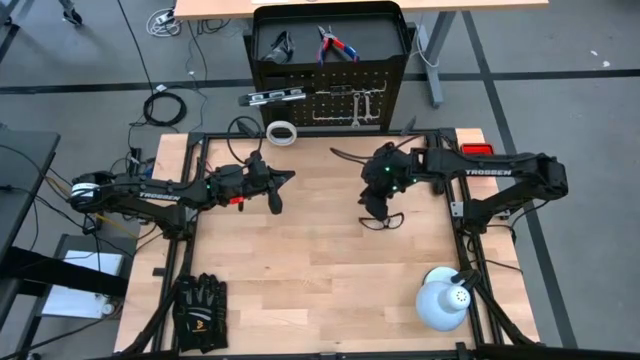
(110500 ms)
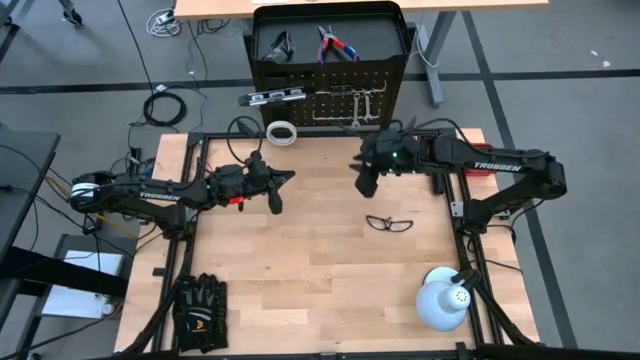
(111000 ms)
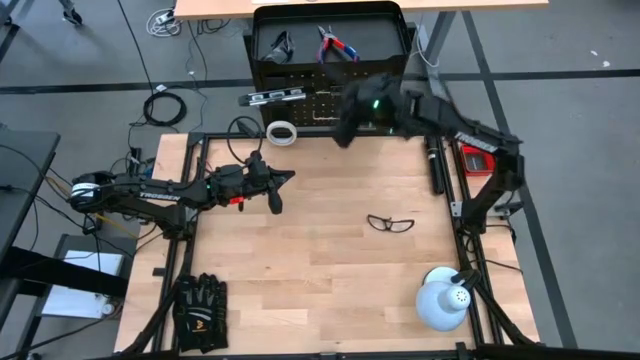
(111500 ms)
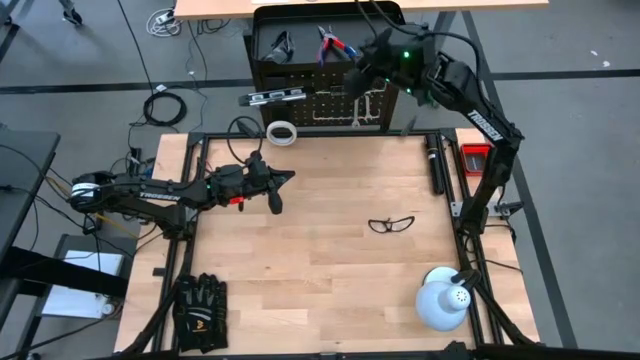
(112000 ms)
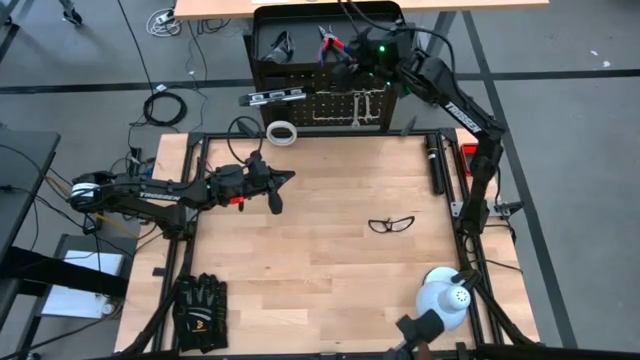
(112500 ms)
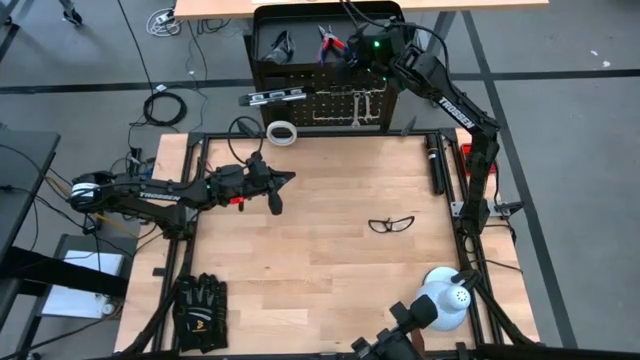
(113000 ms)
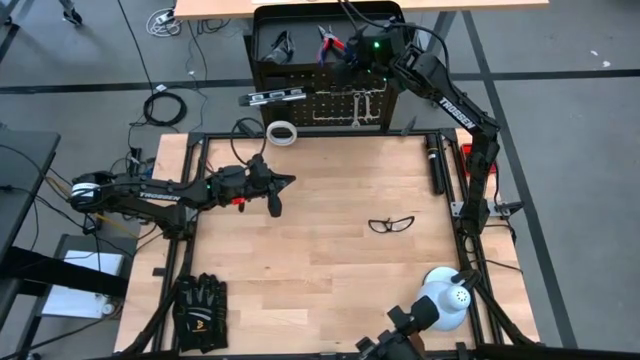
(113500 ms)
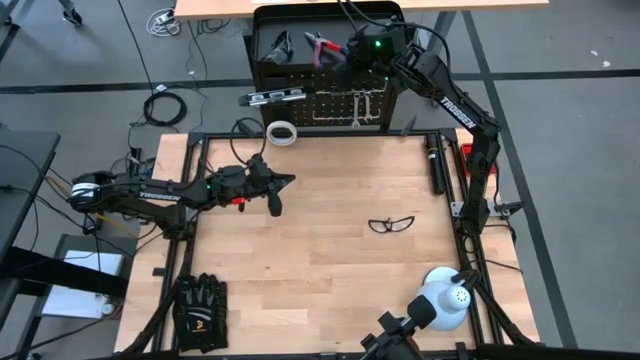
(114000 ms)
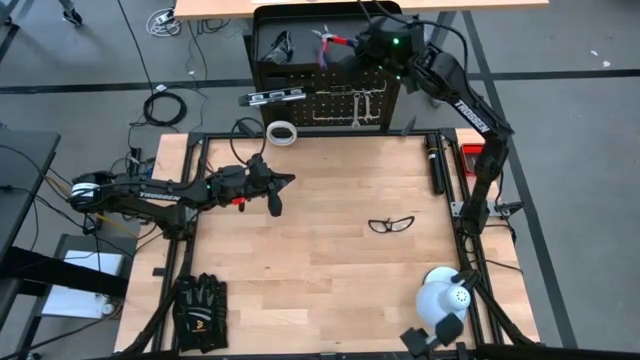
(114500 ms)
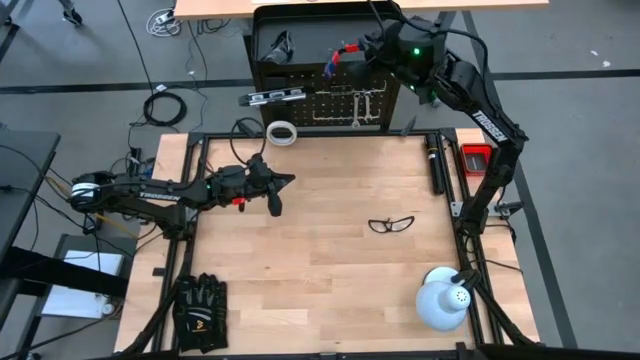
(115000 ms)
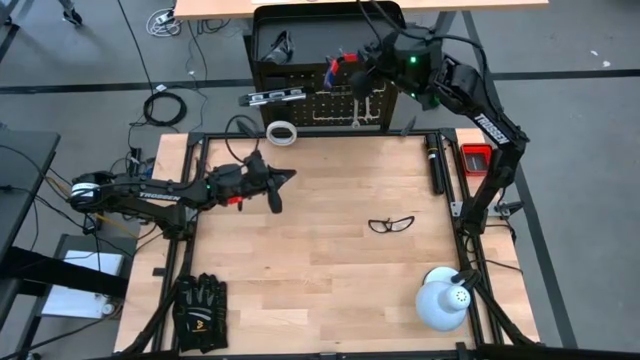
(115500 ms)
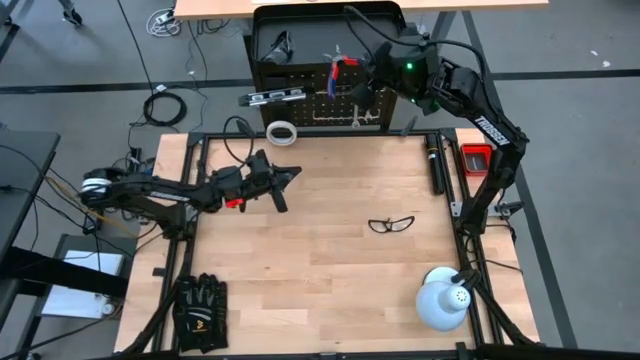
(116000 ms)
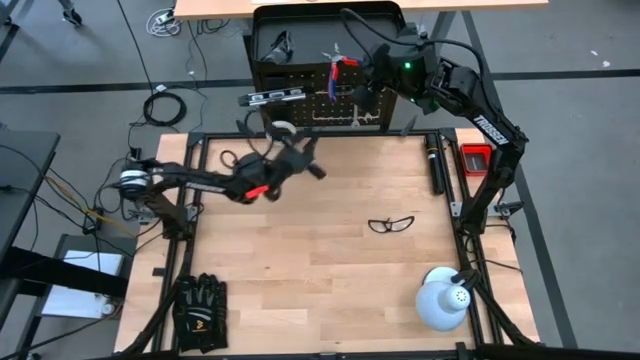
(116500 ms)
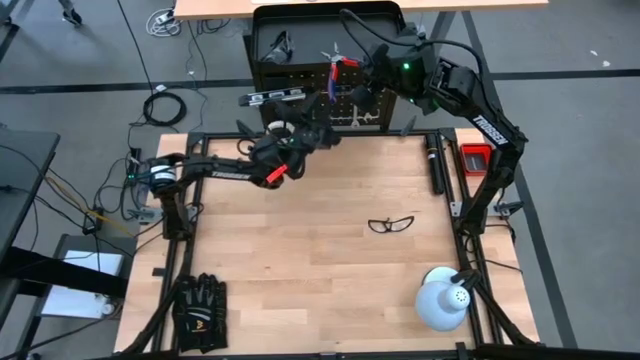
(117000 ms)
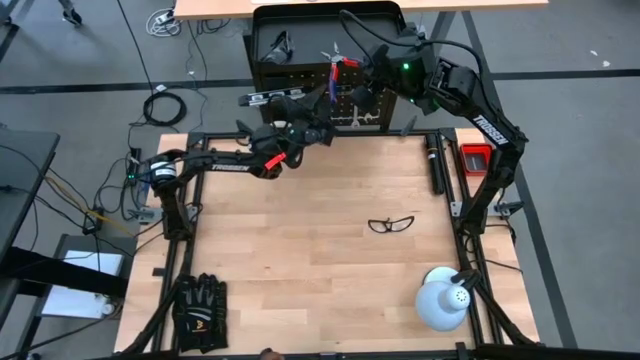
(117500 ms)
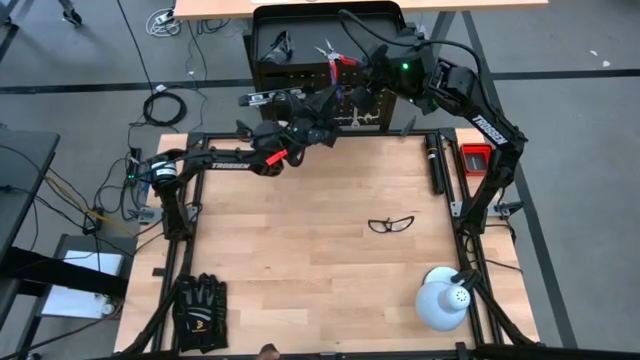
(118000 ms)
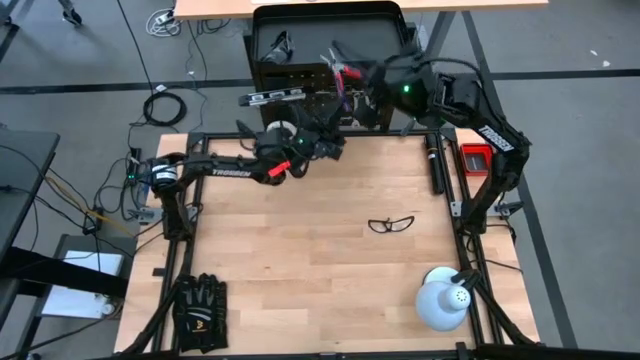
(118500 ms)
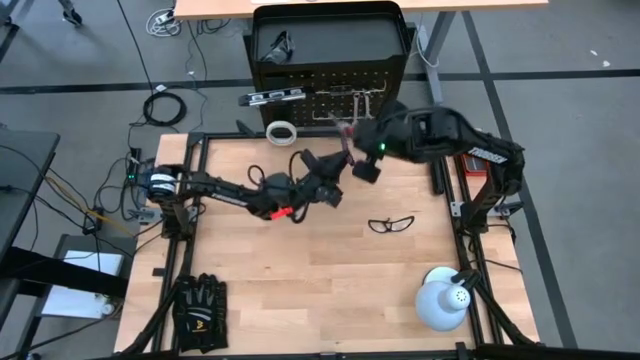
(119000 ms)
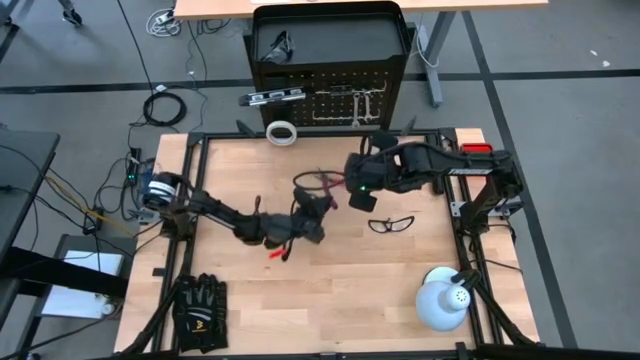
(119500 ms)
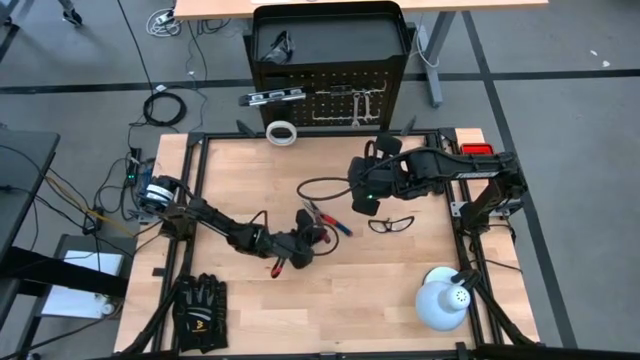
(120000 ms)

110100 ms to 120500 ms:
Task: Hang tools onto peg board
Remove the blue pliers from the peg board

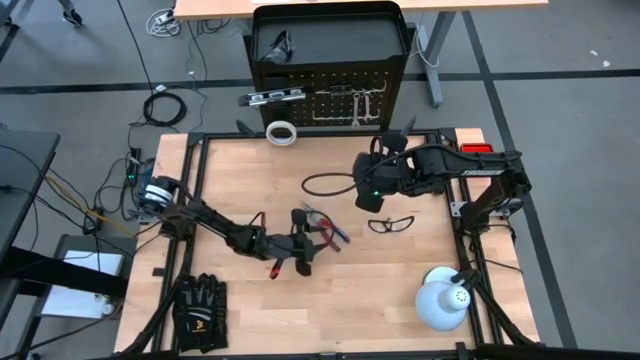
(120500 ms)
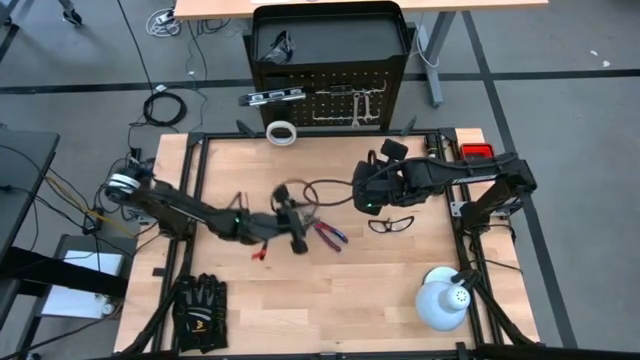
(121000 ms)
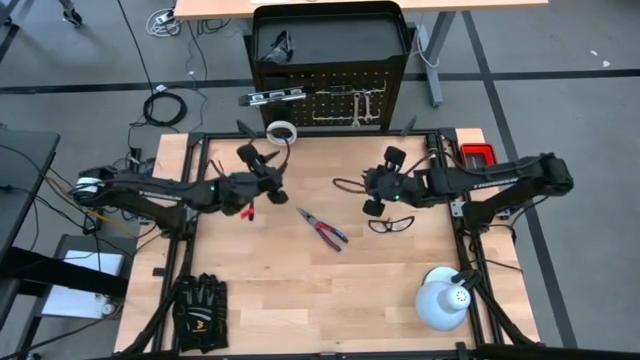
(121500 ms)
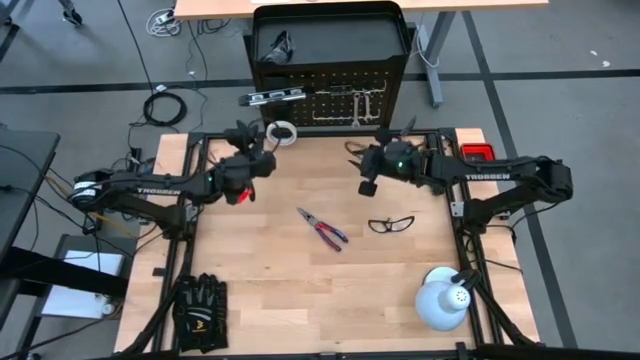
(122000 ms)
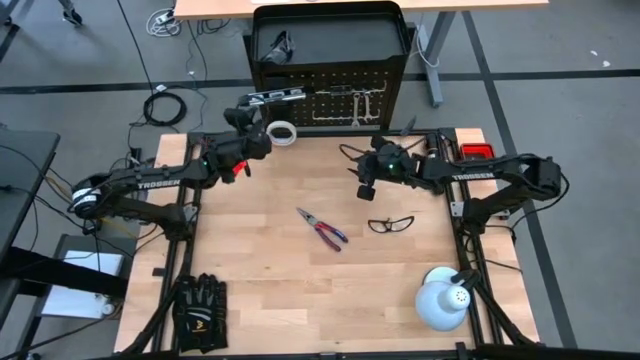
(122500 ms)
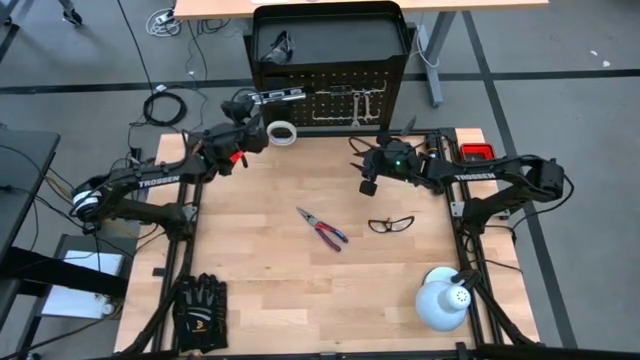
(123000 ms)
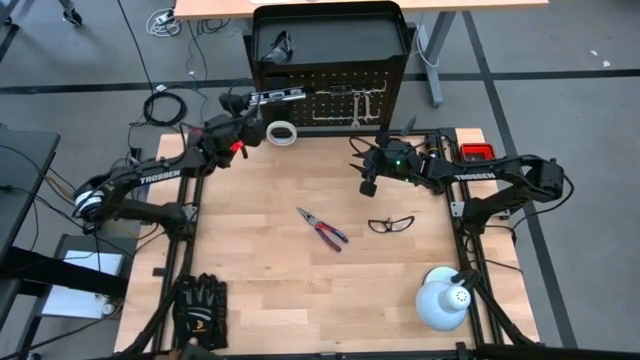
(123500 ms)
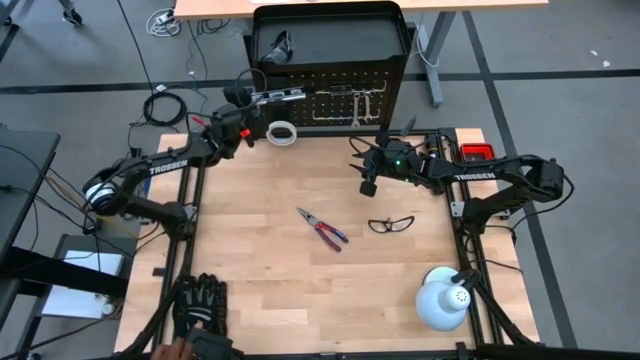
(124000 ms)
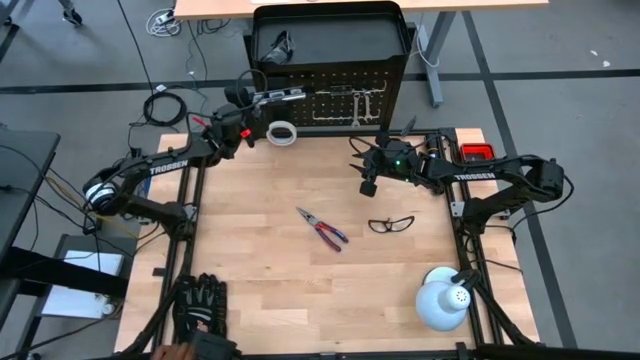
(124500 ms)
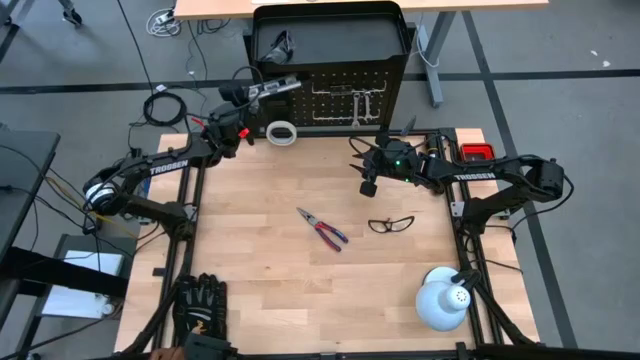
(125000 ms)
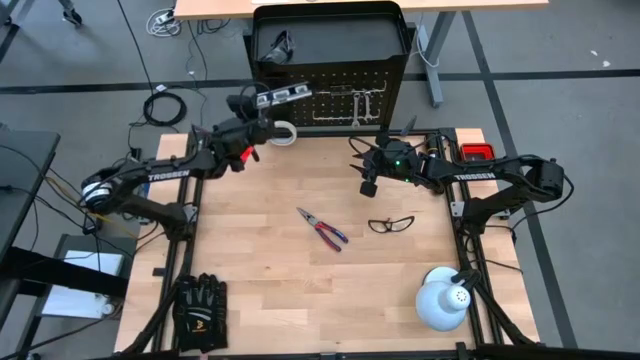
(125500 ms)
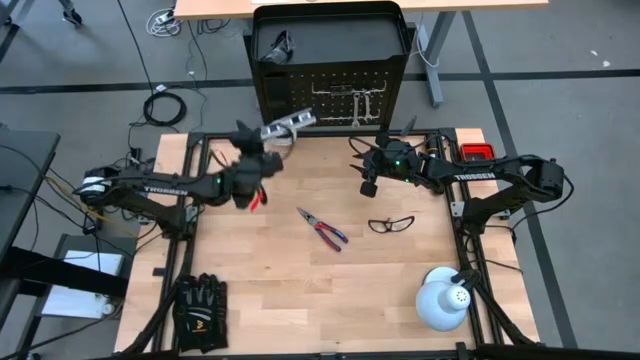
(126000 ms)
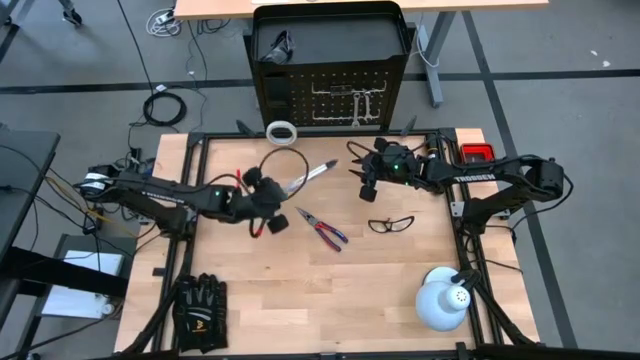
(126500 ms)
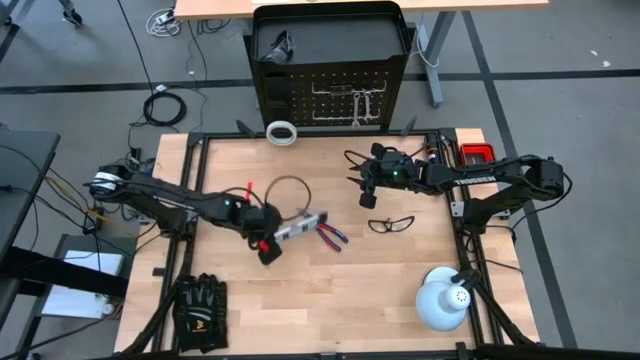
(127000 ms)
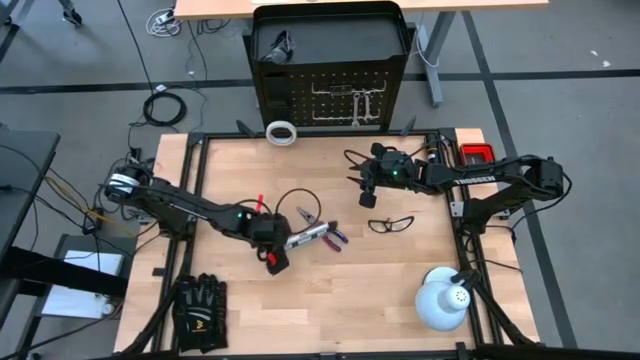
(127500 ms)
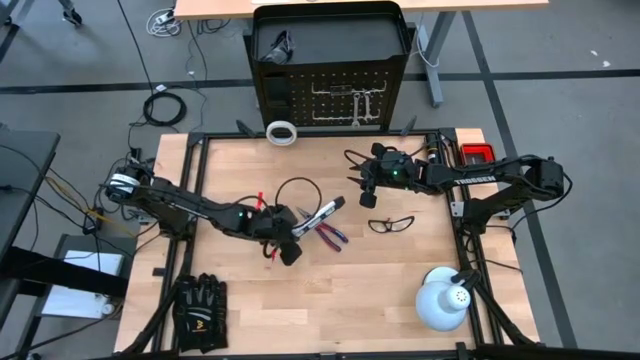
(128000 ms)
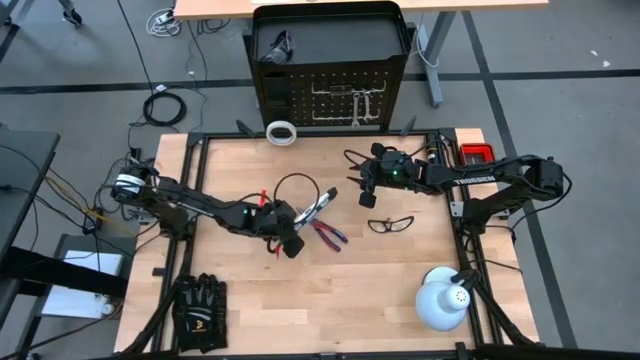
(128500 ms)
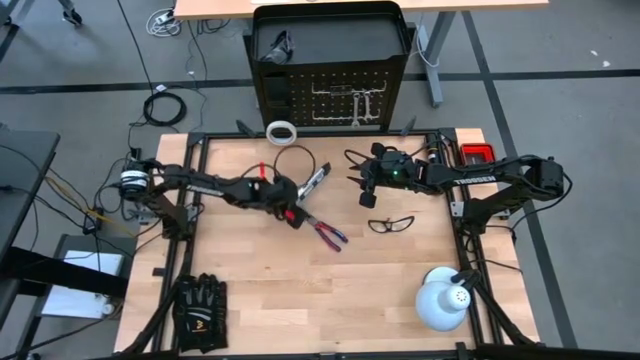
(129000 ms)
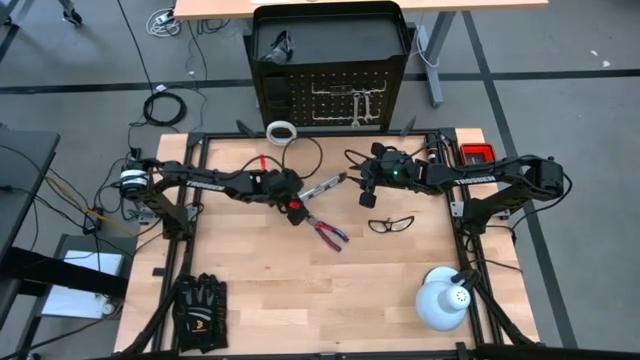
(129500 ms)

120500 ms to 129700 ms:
Remove the spirit level from the black bin of the peg board
